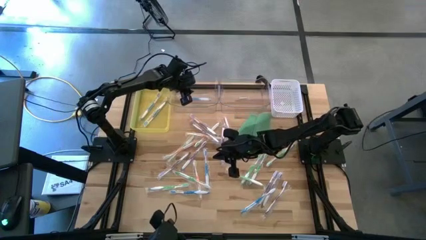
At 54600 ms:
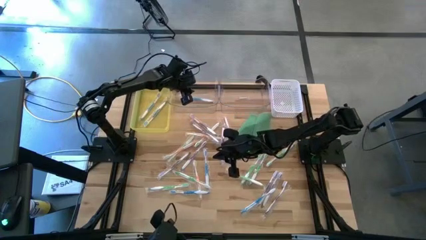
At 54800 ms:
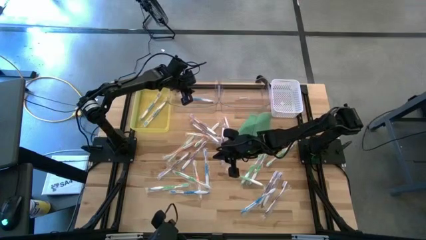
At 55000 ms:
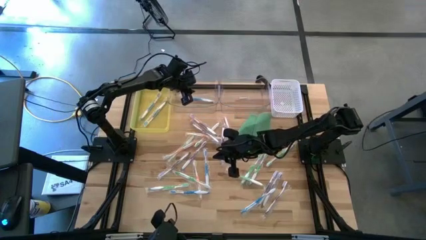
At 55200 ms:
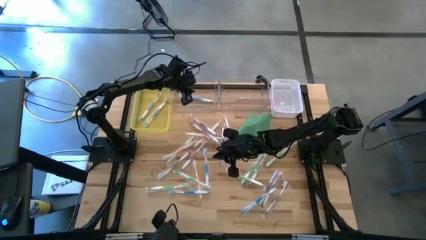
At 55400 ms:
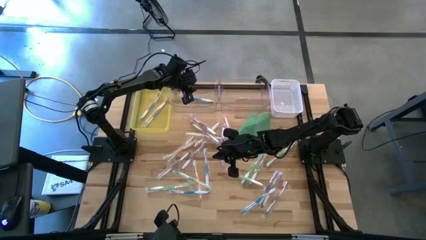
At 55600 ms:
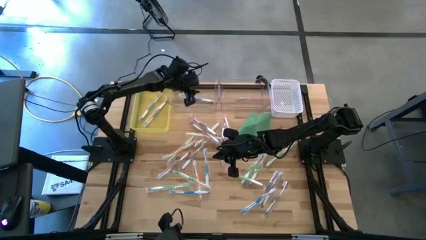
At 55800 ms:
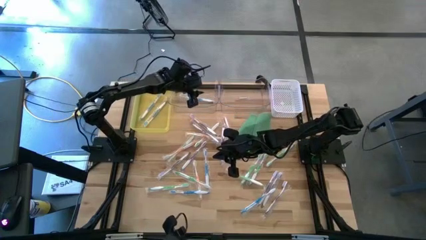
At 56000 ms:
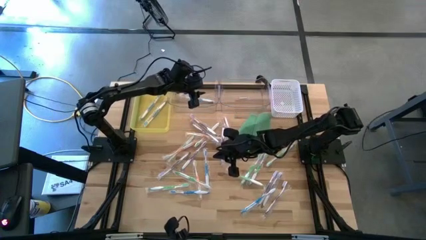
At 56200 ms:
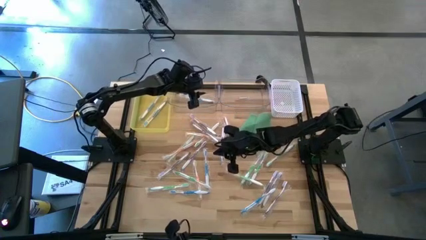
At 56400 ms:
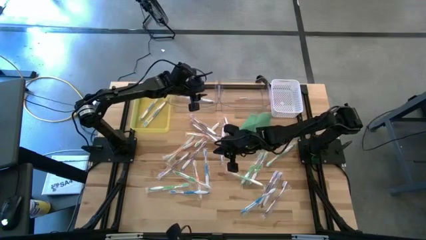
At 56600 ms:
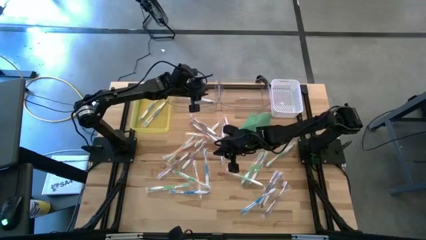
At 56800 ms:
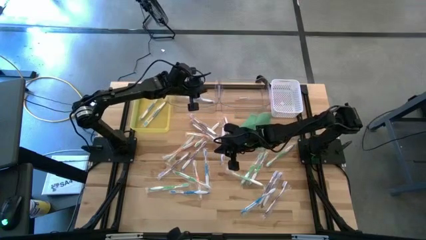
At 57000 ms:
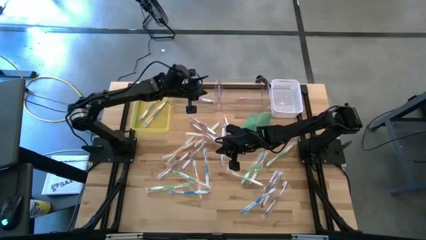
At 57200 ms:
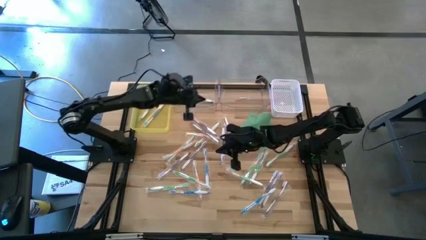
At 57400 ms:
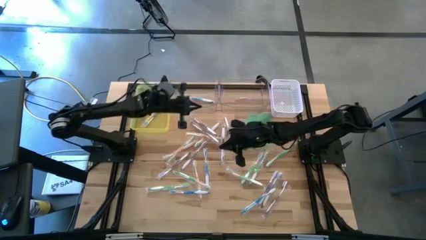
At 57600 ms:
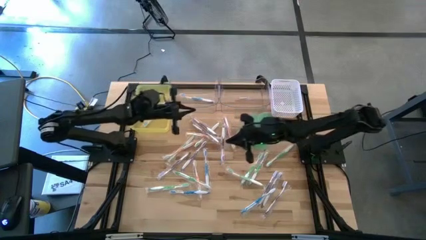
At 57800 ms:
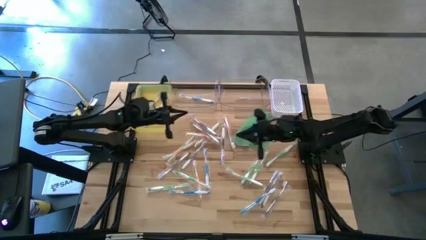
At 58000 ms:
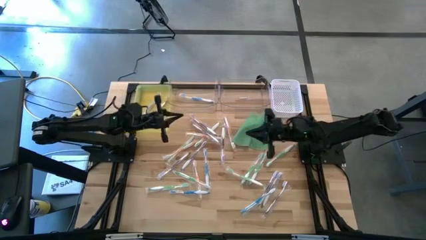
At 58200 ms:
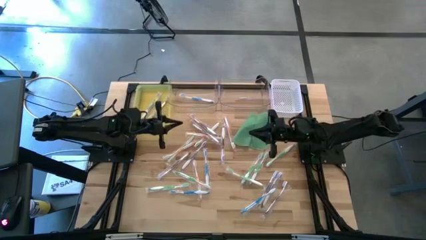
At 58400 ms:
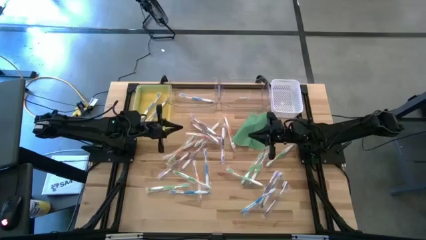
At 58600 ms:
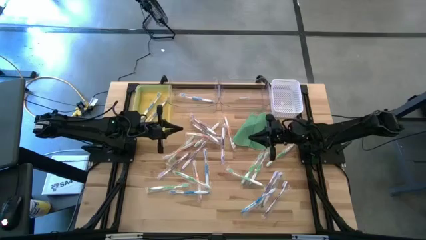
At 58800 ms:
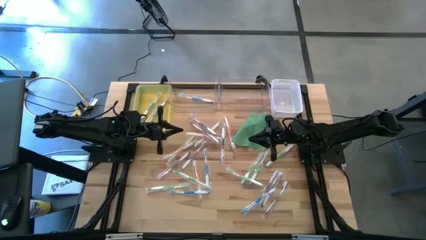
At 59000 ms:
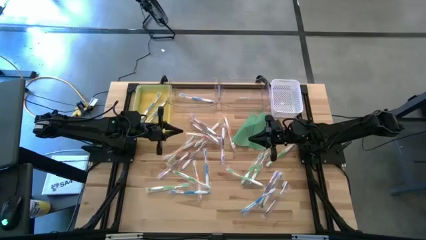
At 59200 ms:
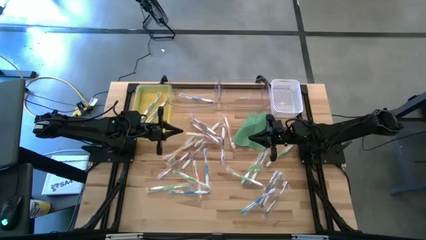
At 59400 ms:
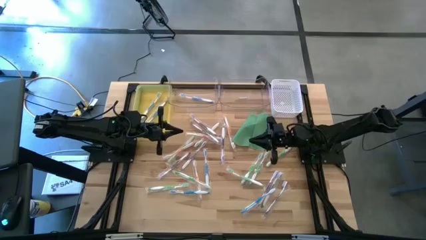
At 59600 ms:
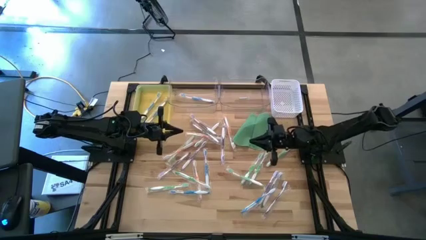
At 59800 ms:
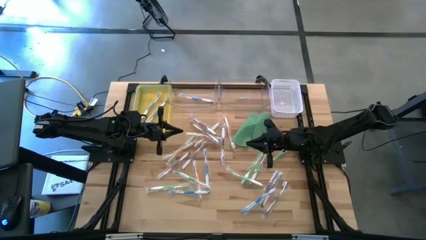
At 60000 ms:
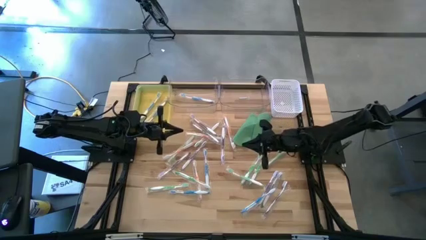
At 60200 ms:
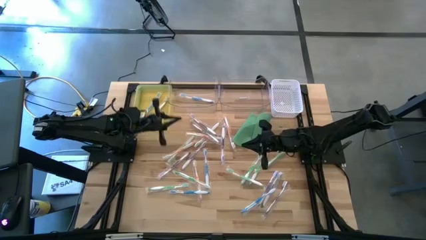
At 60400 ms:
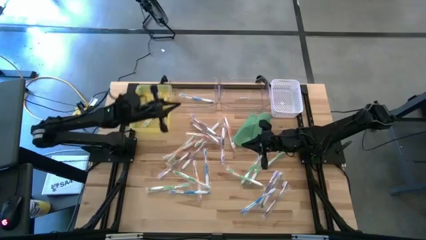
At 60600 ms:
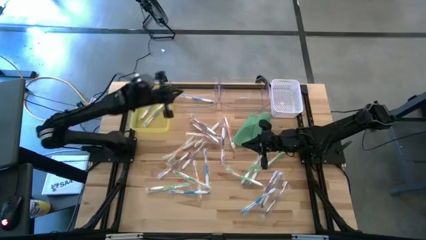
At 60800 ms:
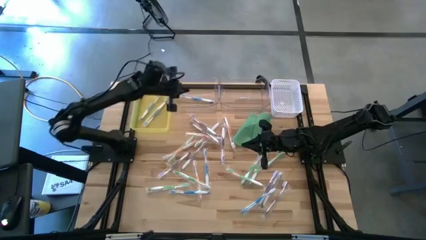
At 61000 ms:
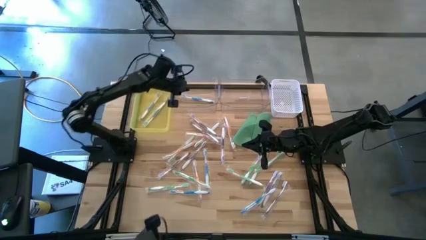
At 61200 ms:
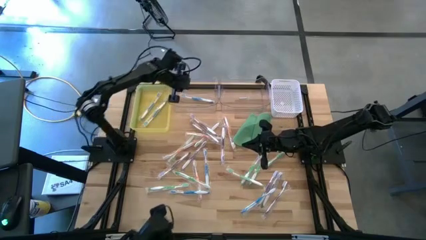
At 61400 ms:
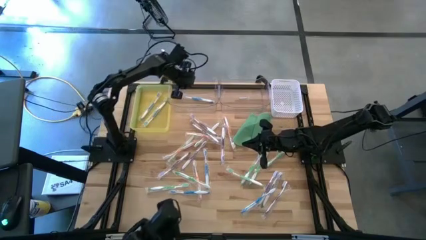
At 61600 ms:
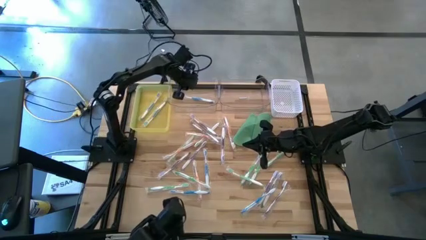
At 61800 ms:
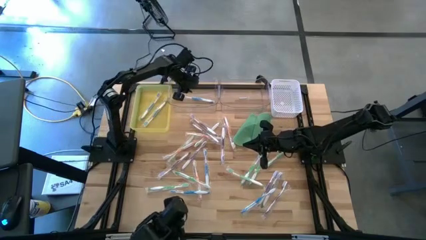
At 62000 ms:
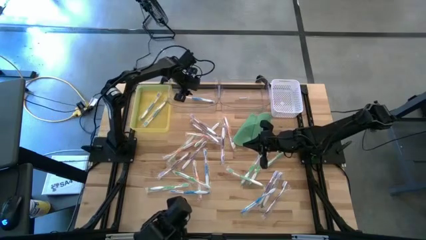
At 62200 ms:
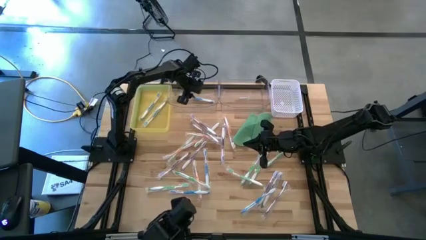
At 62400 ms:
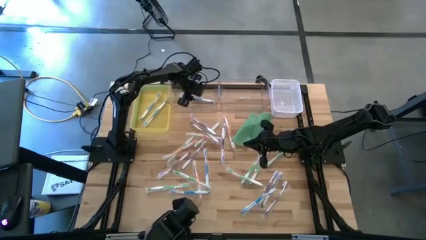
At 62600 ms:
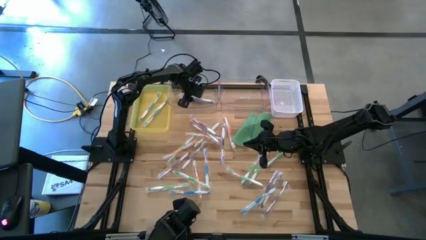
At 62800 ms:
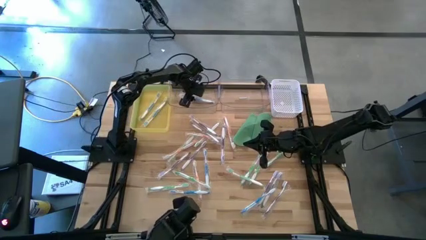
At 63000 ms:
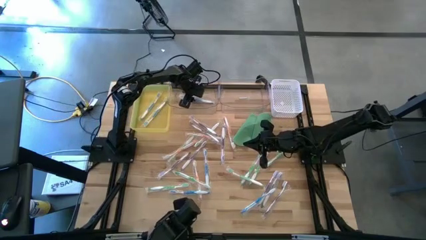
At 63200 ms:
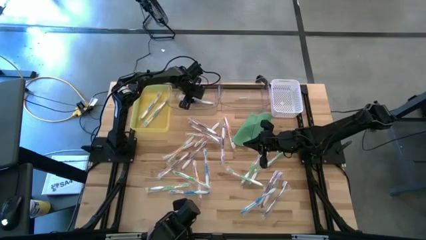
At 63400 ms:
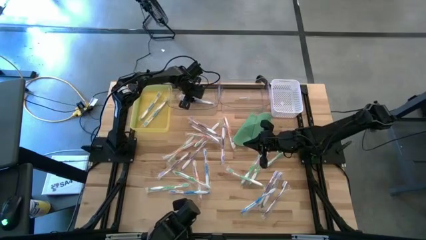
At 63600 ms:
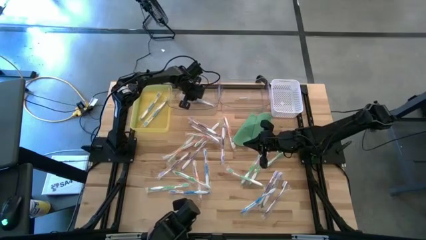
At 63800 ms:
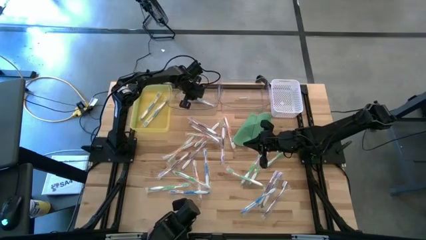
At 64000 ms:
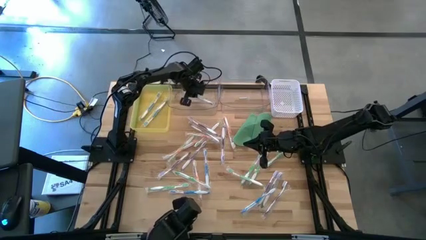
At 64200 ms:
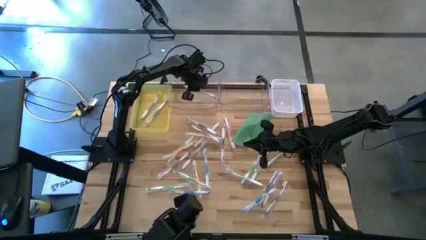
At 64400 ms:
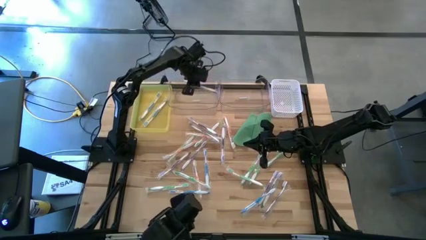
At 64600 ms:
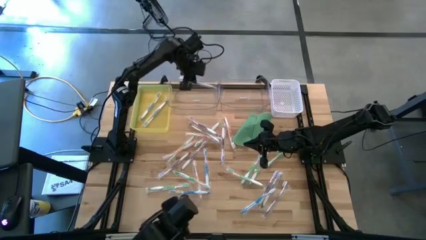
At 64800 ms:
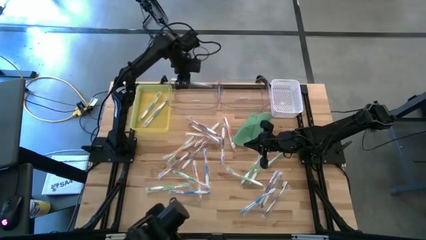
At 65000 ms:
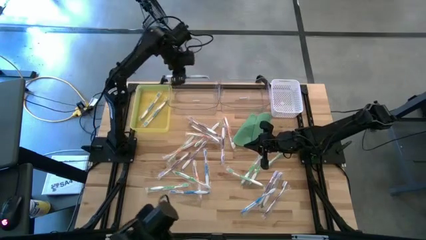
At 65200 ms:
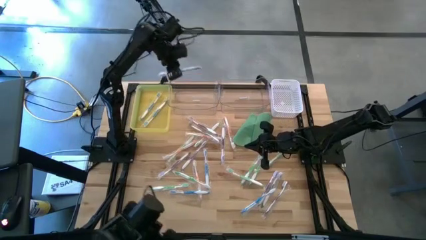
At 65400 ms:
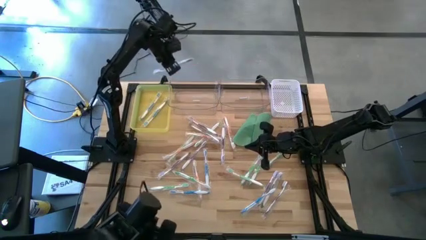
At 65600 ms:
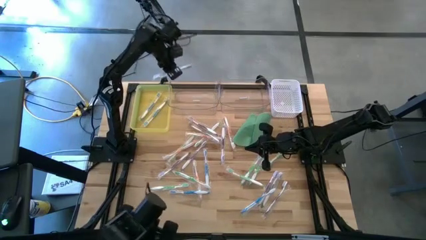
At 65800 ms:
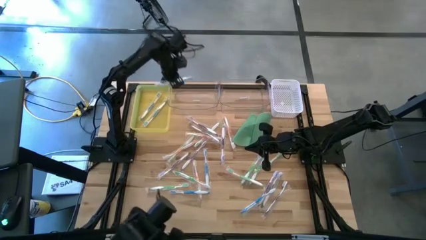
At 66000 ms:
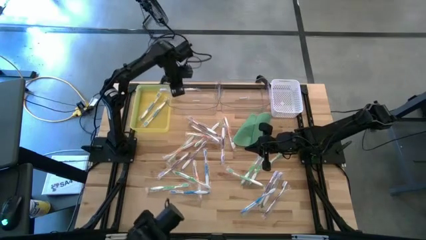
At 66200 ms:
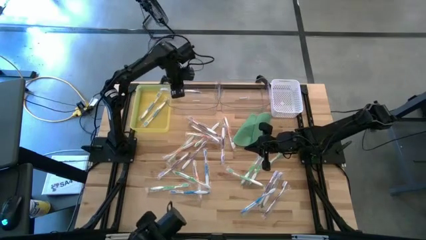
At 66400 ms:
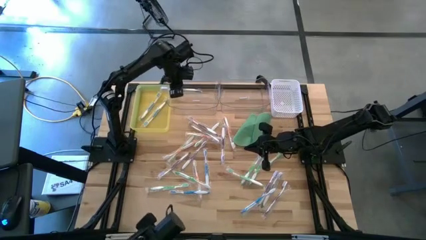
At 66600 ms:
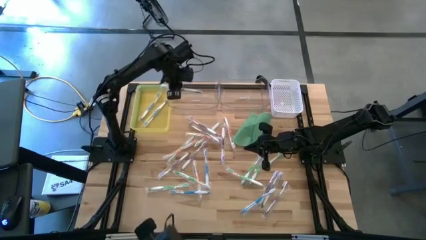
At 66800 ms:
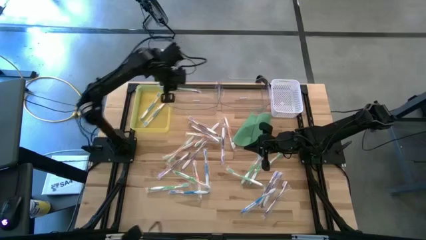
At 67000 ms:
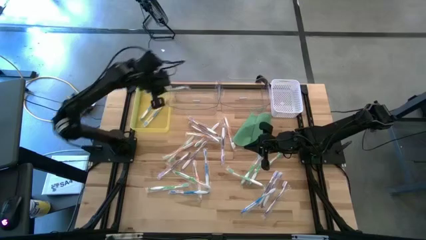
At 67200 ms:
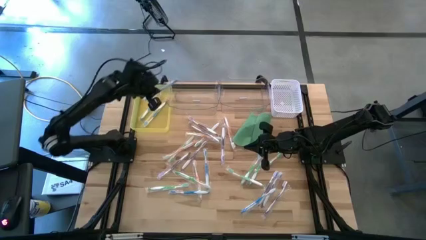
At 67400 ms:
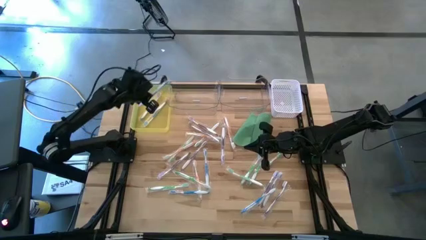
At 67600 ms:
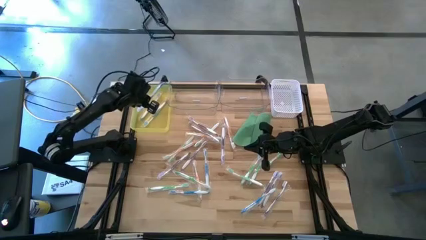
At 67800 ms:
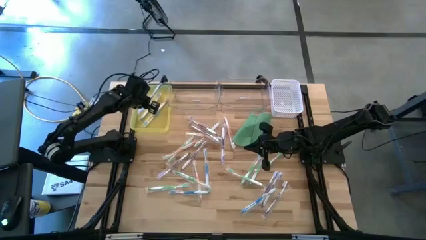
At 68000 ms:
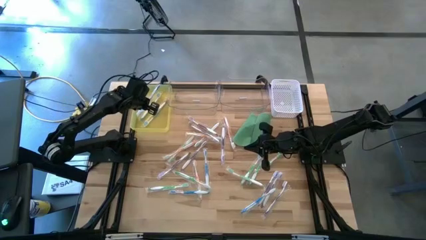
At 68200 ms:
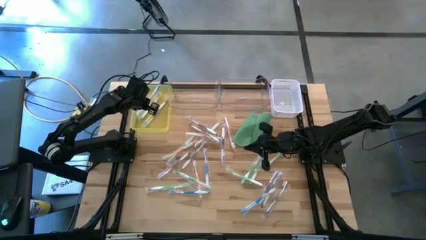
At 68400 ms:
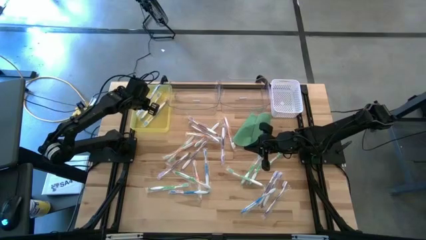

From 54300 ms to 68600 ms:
Task: Pick & Place Toothbrushes
Put the blue toothbrush from the left transparent bin into the yellow bin
